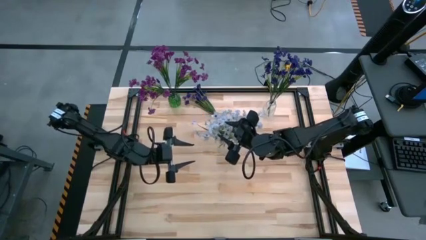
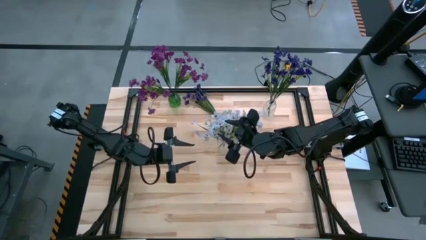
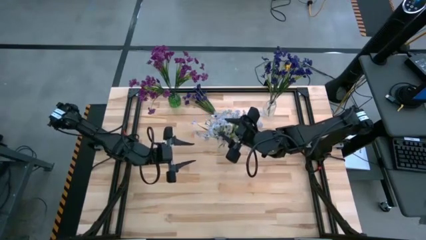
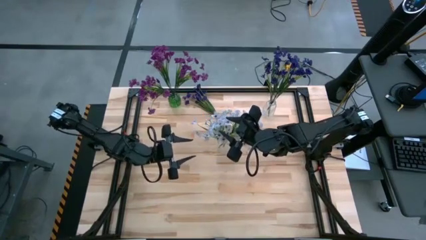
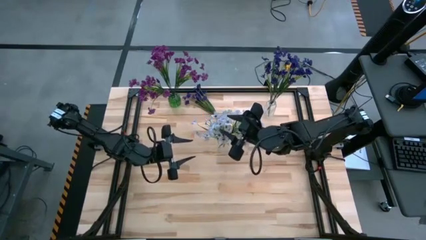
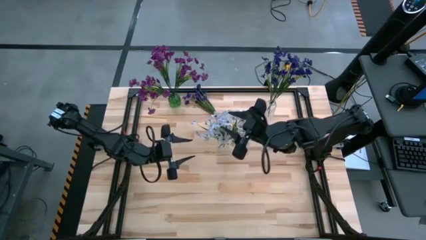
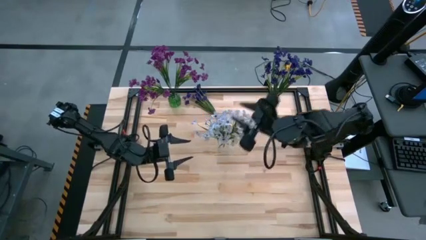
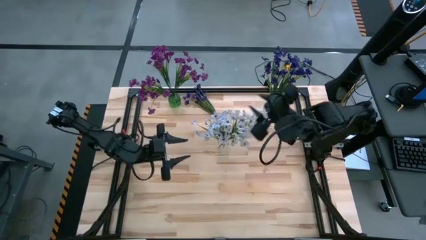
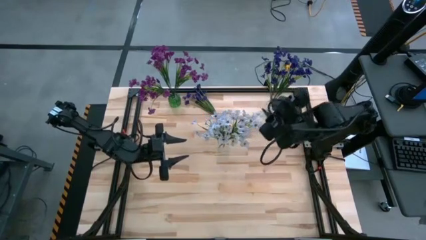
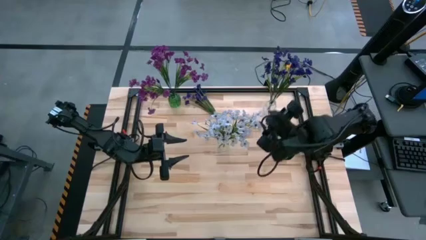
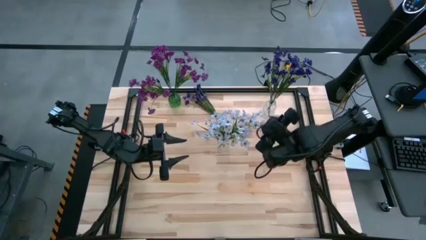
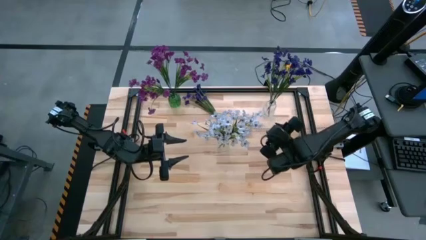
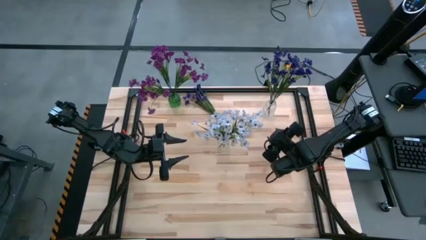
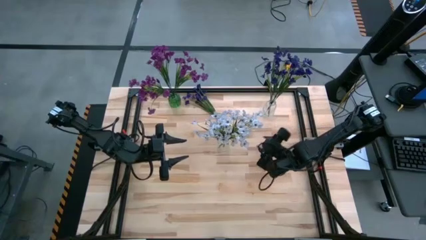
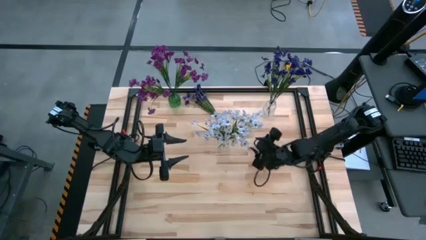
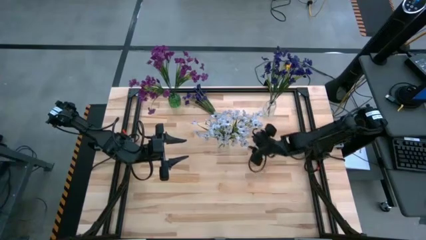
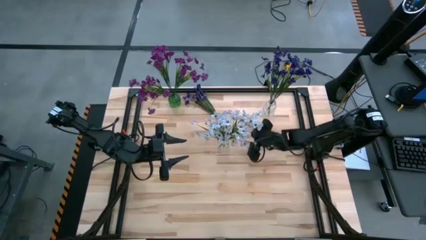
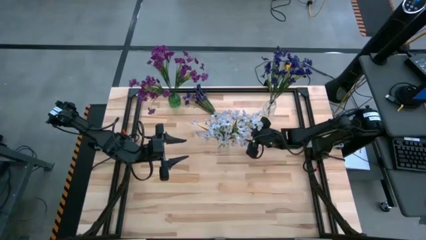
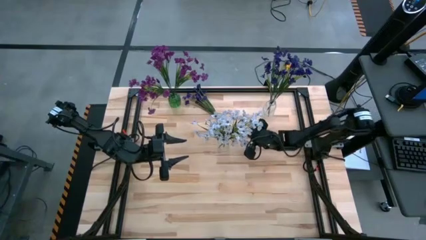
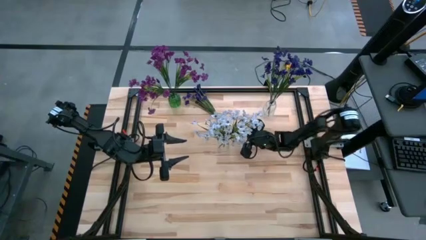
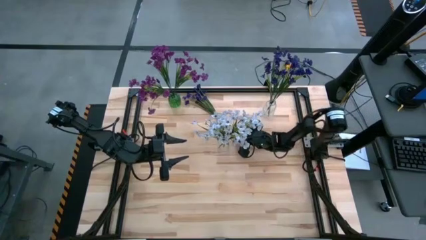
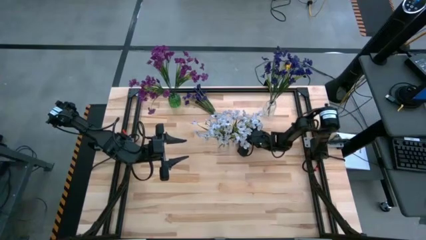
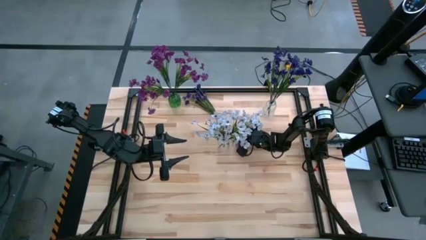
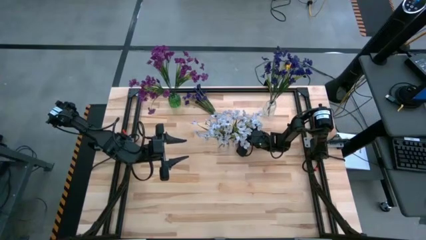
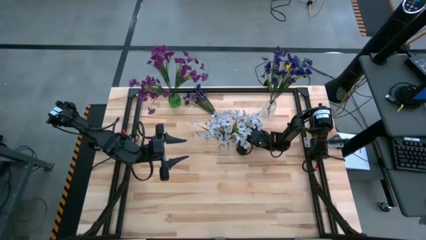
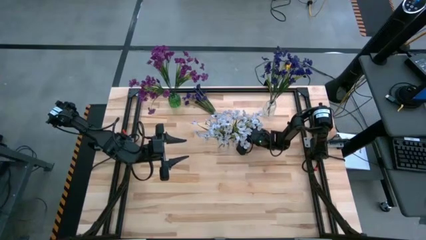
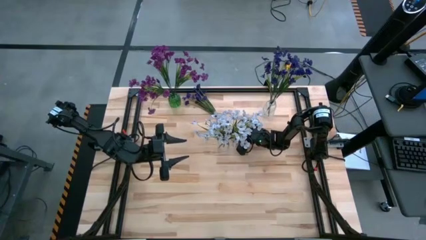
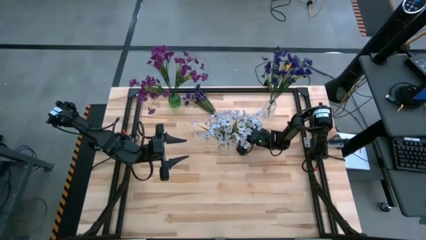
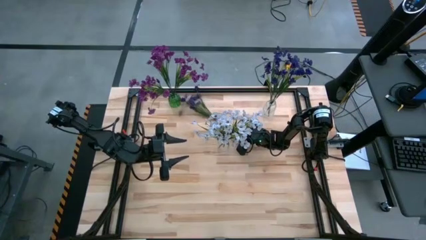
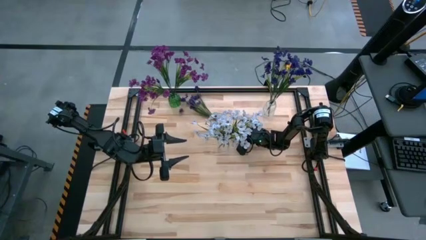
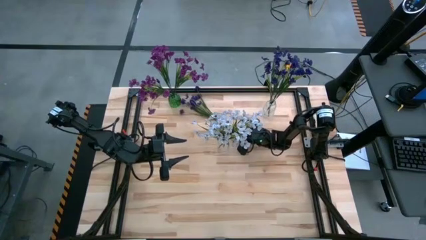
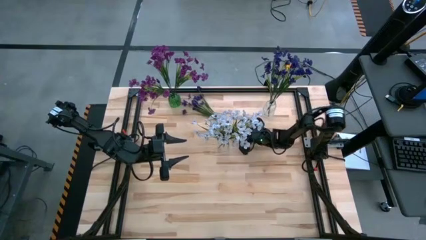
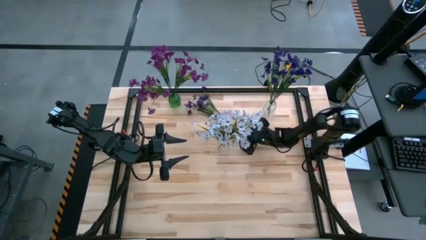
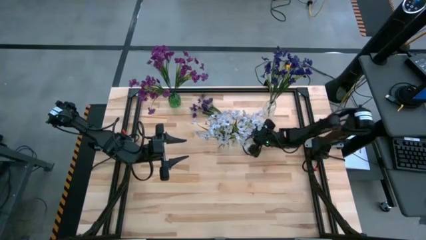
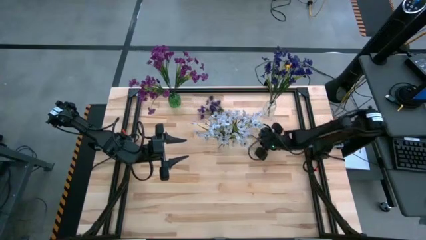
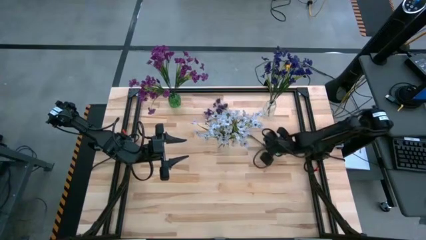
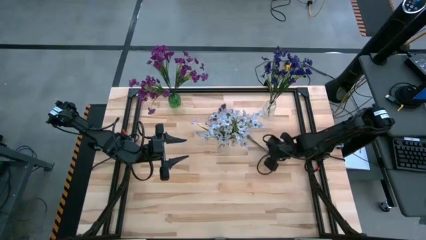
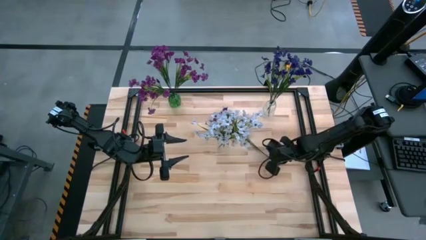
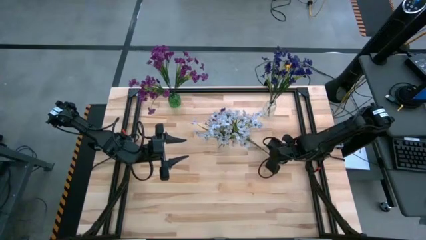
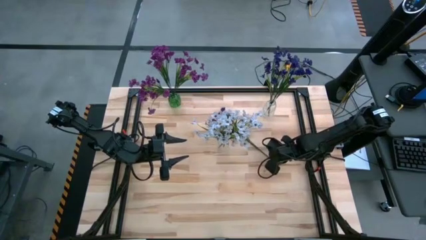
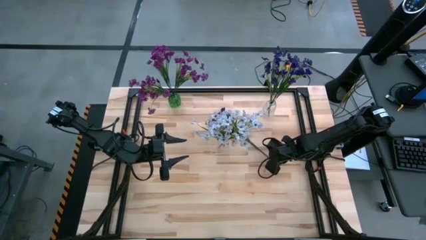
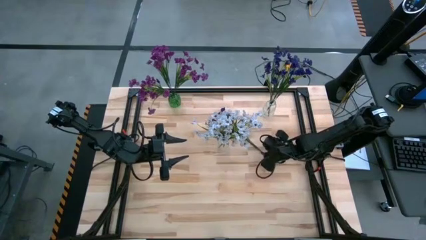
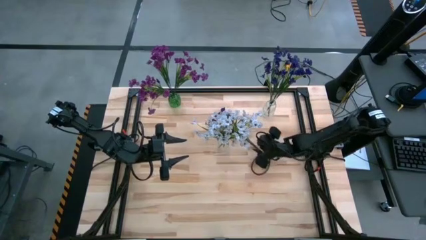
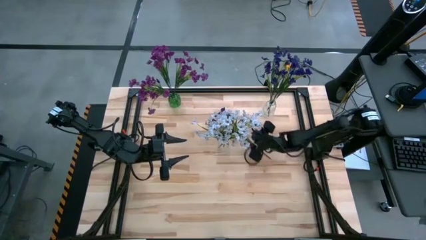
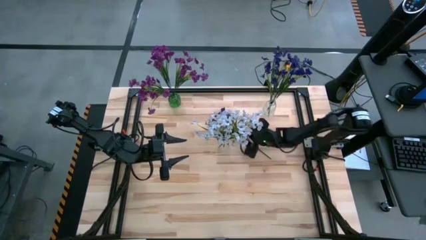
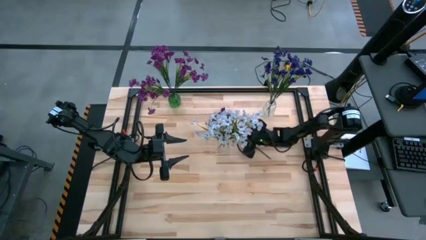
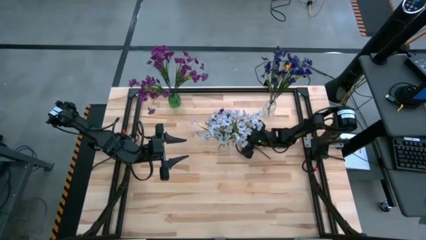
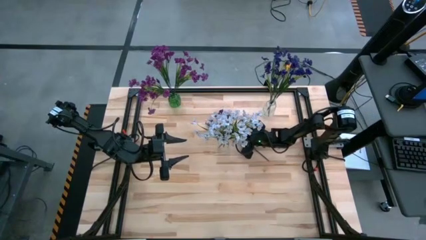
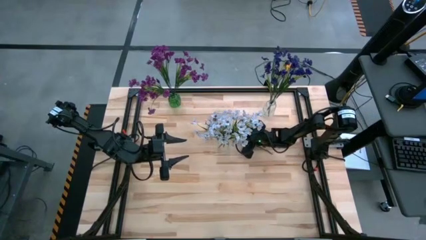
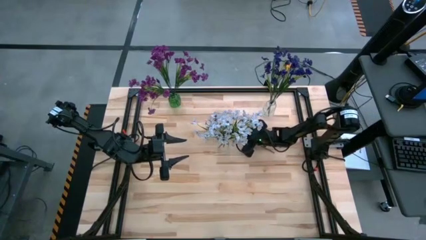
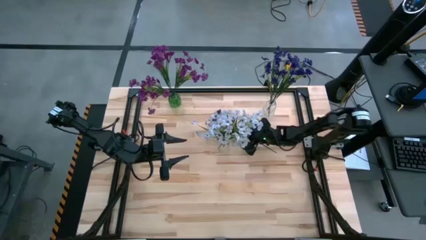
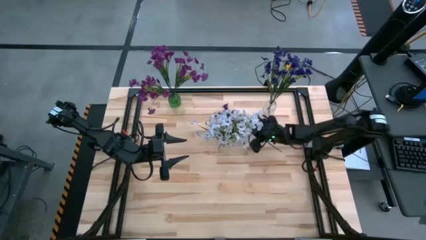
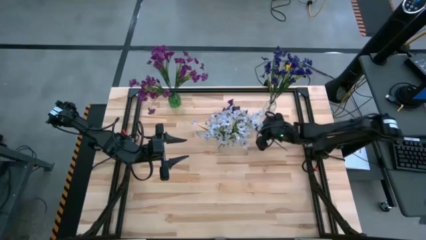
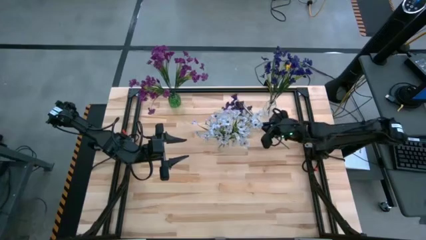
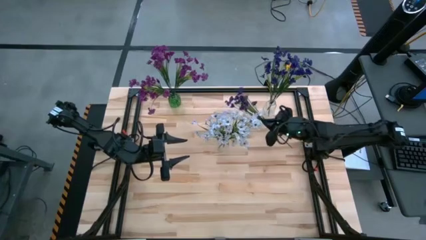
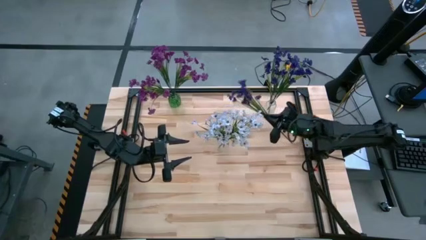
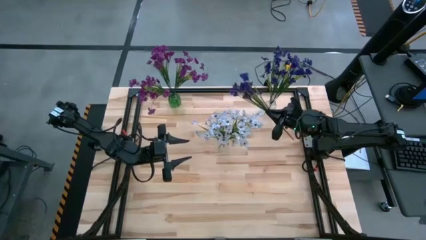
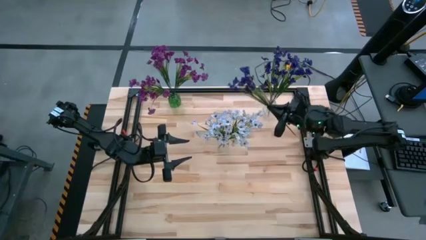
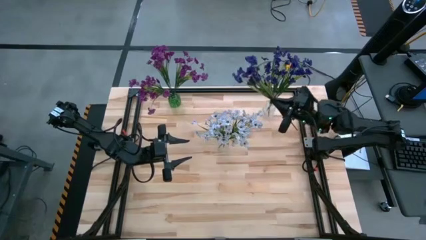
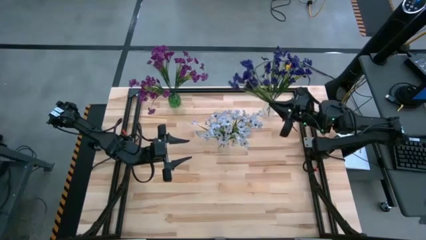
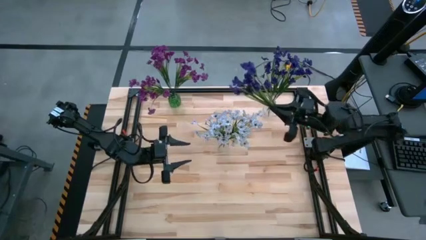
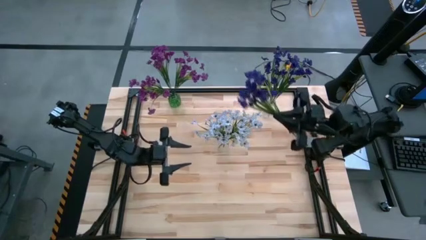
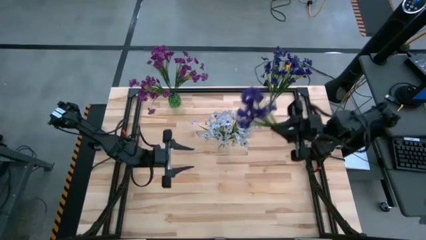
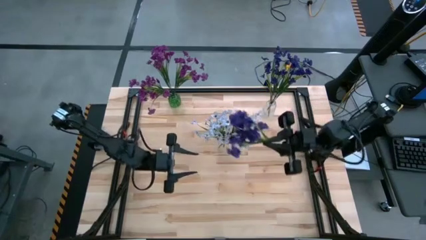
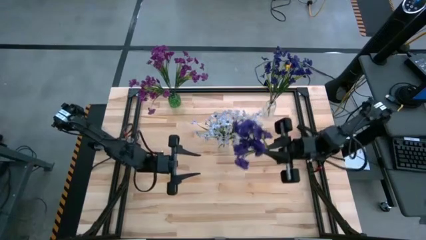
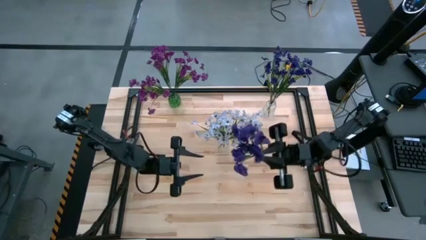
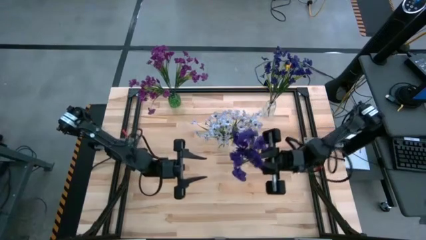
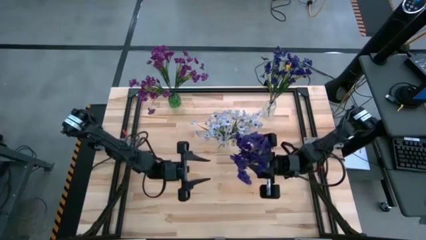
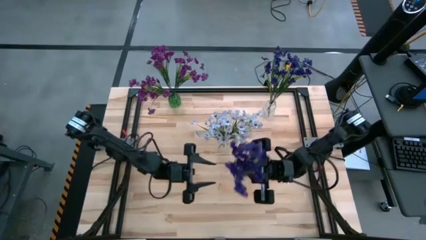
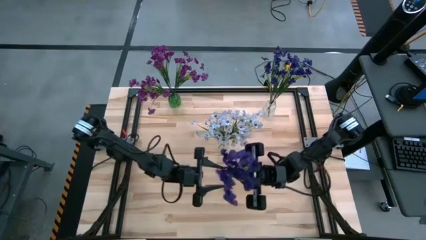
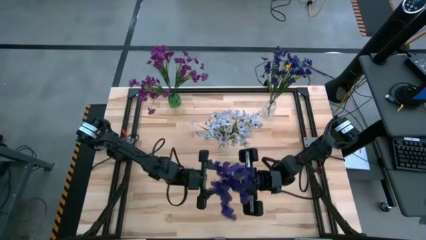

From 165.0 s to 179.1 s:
Task: Sort flowers into vase by color
Put the blue flowers into the top transparent flower vase
